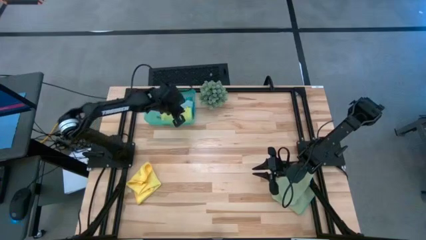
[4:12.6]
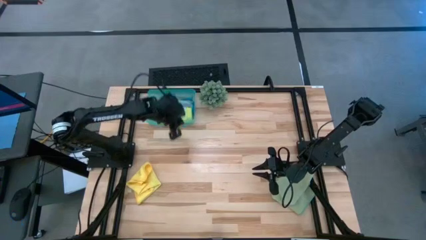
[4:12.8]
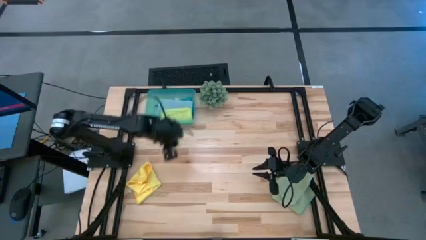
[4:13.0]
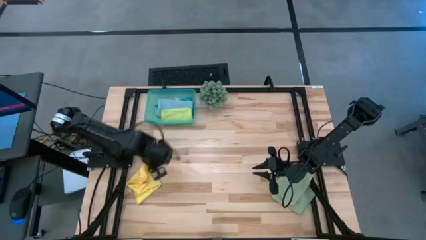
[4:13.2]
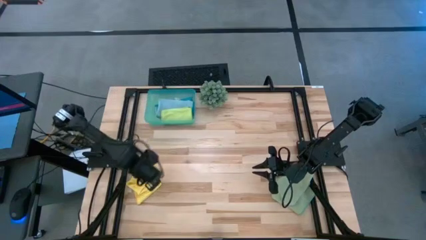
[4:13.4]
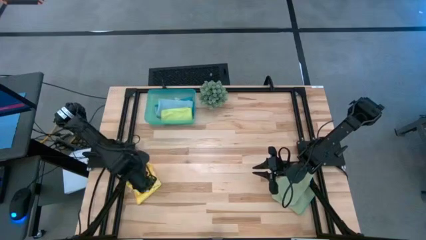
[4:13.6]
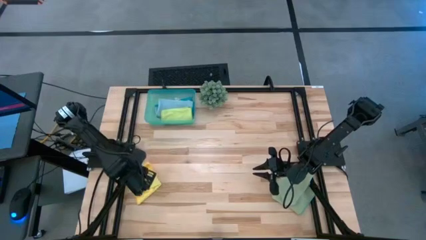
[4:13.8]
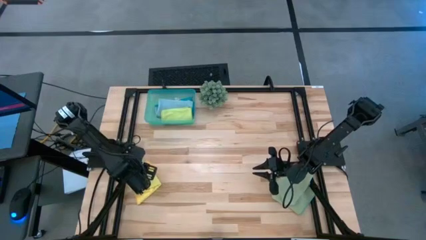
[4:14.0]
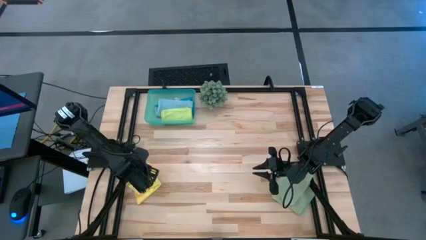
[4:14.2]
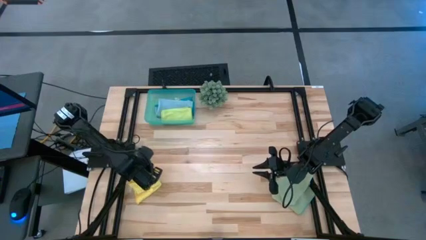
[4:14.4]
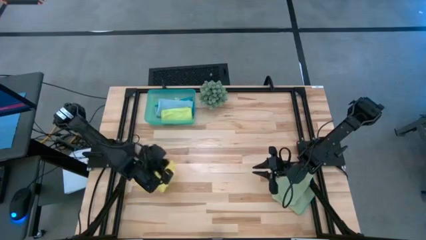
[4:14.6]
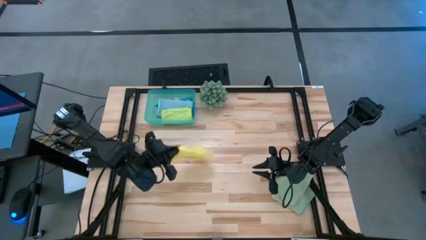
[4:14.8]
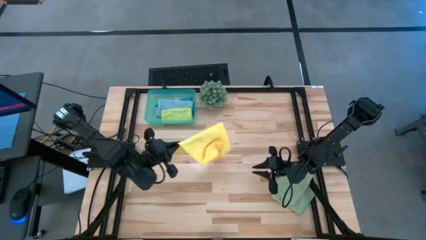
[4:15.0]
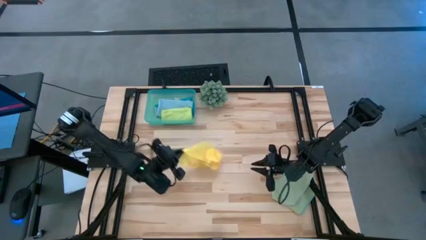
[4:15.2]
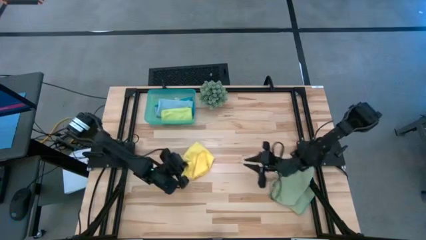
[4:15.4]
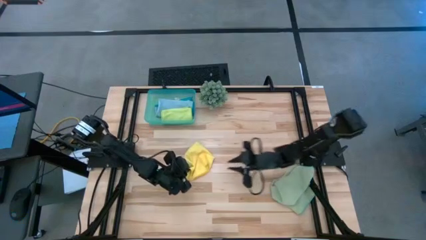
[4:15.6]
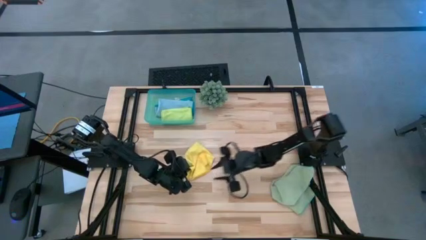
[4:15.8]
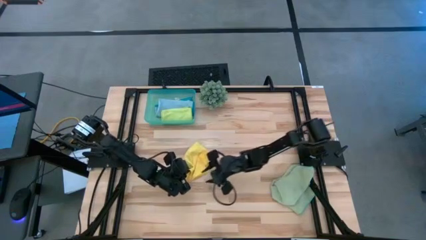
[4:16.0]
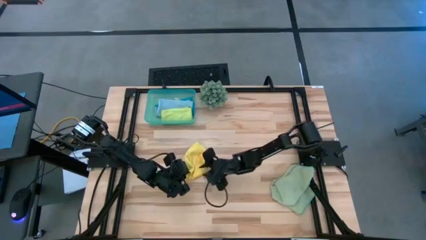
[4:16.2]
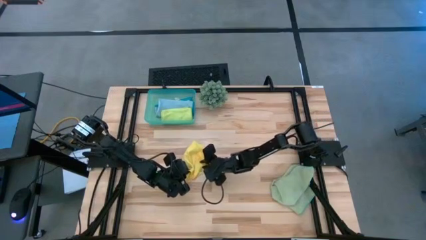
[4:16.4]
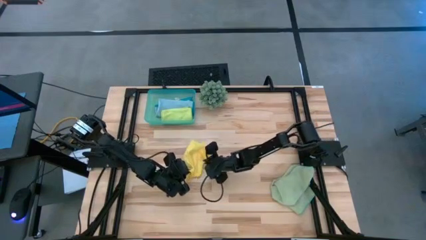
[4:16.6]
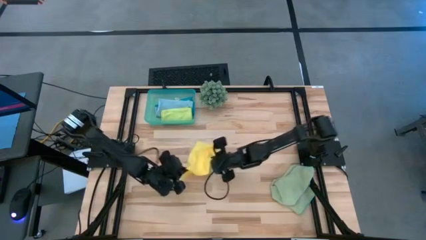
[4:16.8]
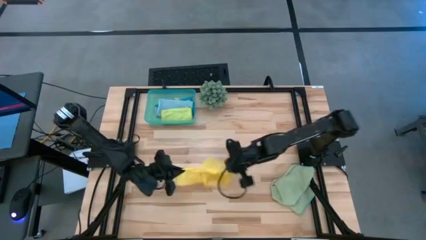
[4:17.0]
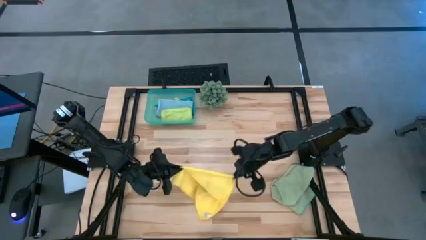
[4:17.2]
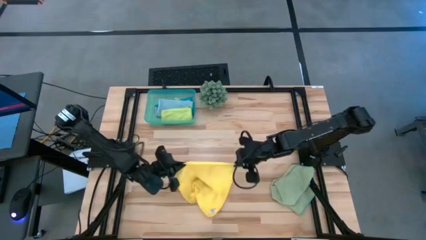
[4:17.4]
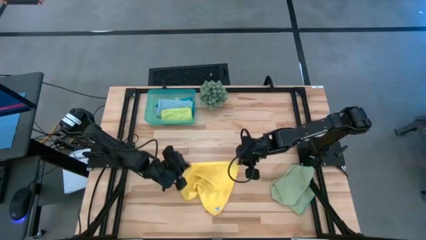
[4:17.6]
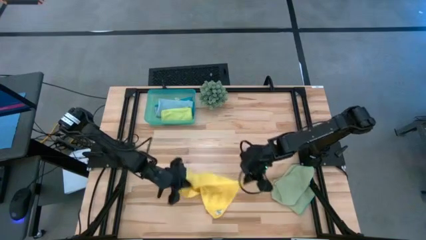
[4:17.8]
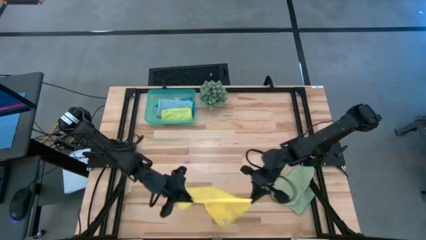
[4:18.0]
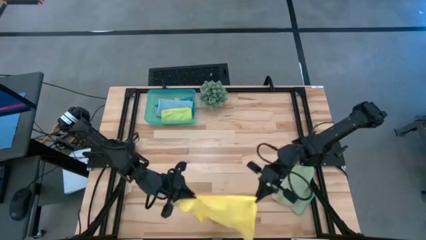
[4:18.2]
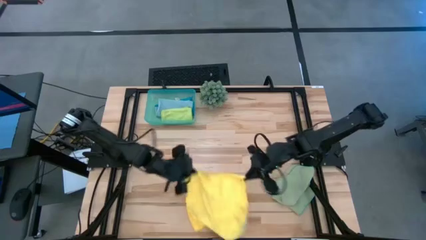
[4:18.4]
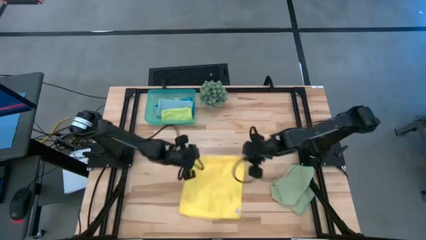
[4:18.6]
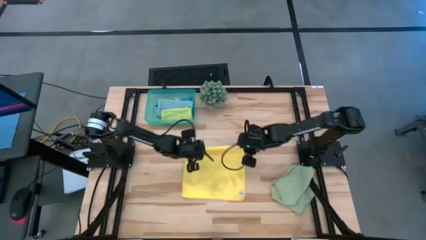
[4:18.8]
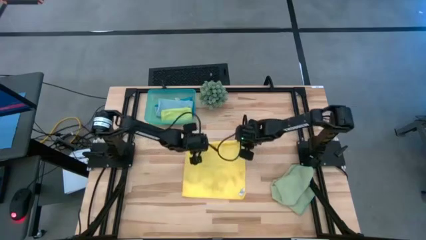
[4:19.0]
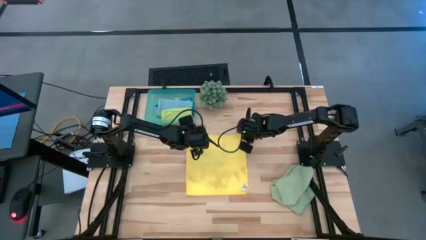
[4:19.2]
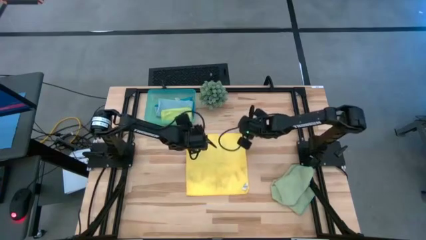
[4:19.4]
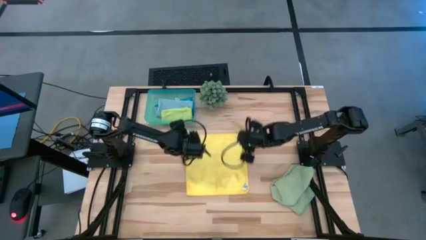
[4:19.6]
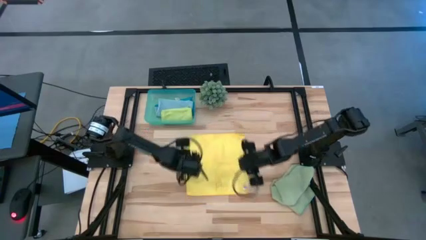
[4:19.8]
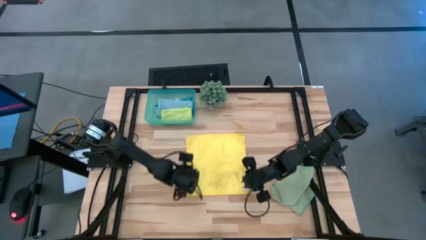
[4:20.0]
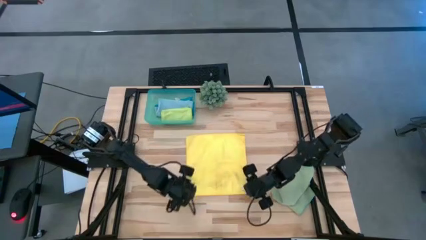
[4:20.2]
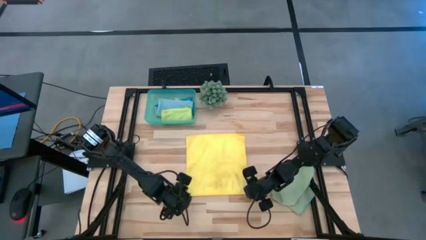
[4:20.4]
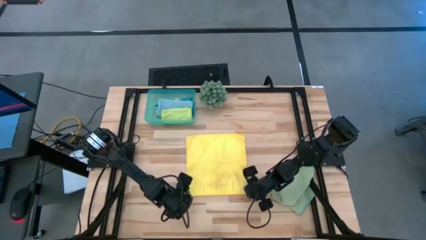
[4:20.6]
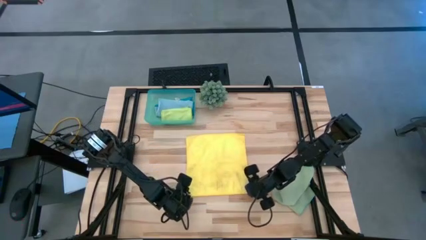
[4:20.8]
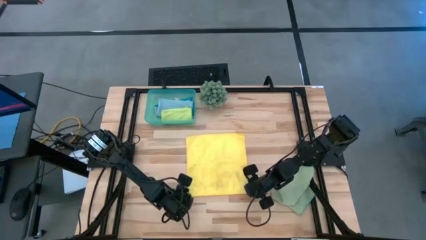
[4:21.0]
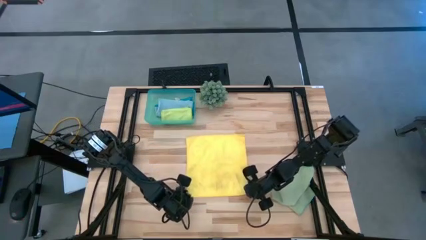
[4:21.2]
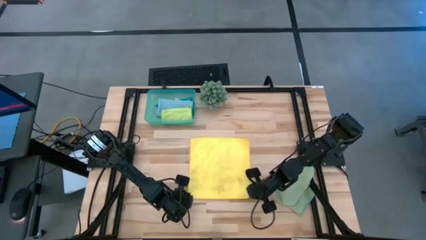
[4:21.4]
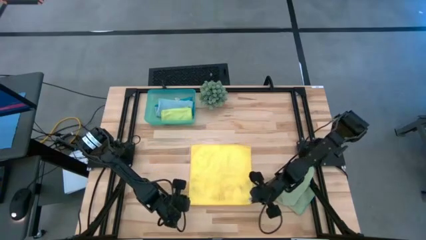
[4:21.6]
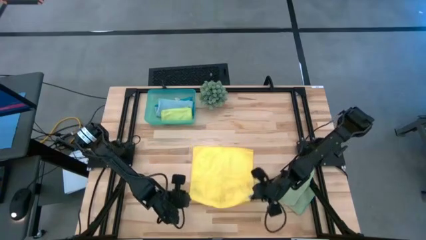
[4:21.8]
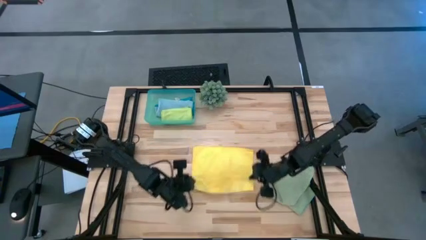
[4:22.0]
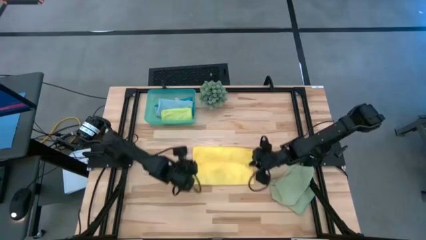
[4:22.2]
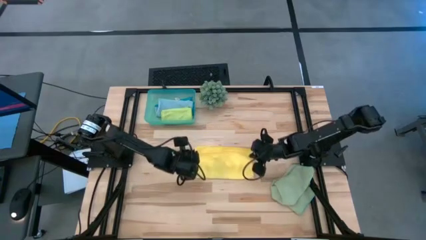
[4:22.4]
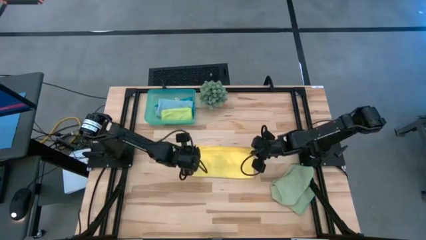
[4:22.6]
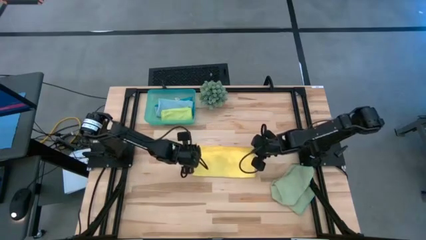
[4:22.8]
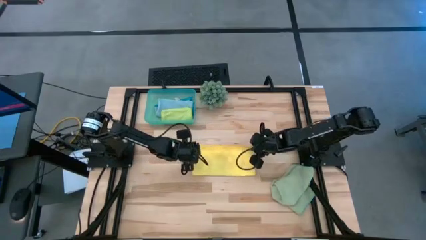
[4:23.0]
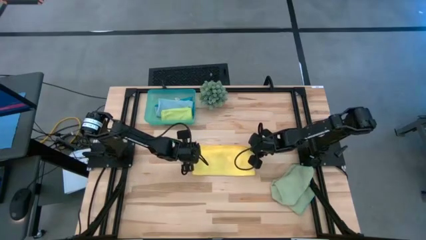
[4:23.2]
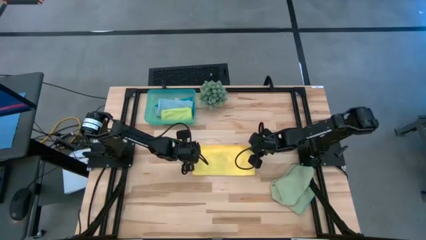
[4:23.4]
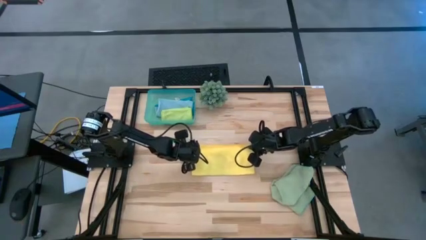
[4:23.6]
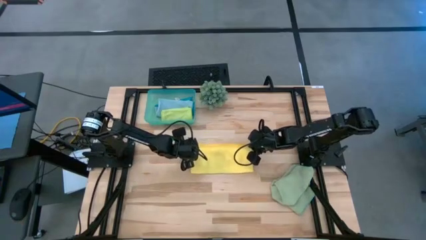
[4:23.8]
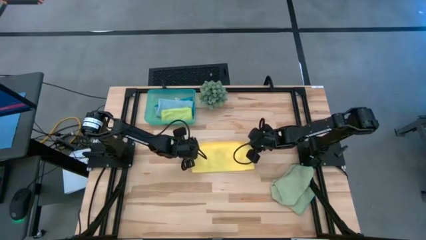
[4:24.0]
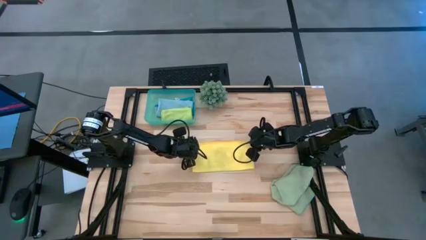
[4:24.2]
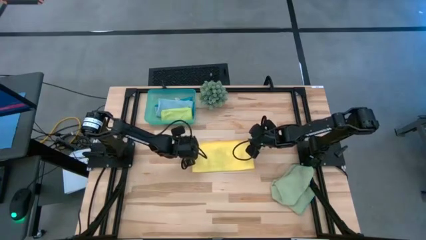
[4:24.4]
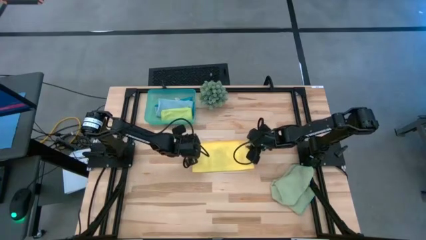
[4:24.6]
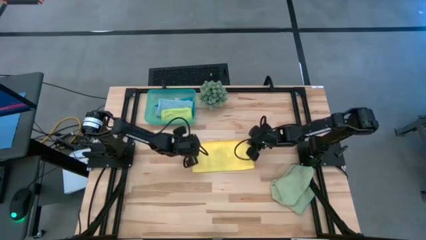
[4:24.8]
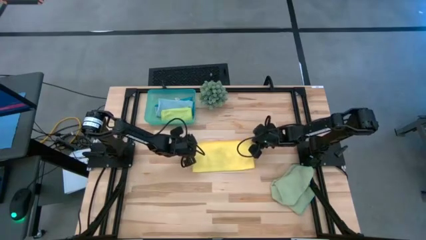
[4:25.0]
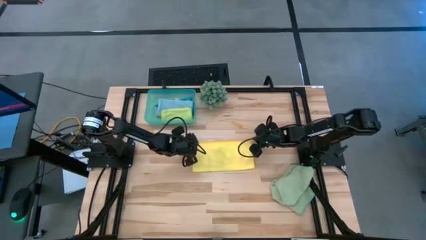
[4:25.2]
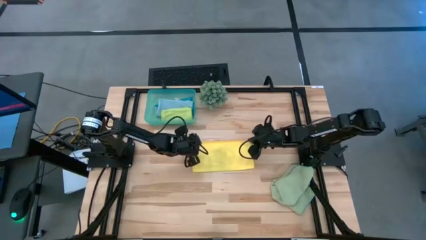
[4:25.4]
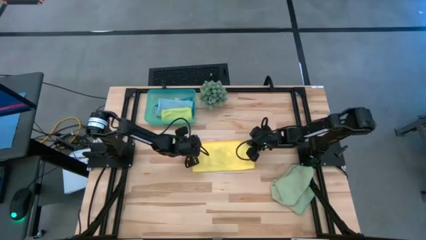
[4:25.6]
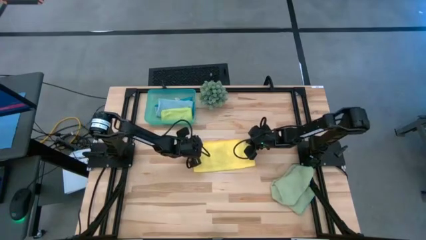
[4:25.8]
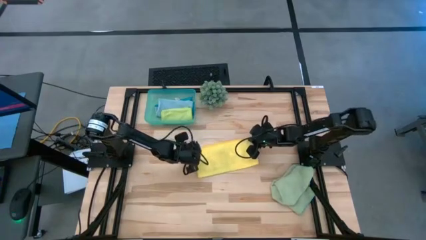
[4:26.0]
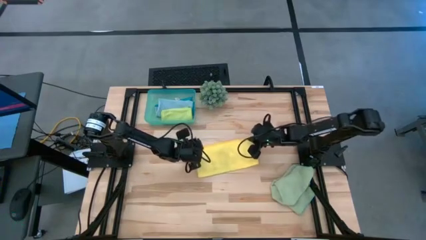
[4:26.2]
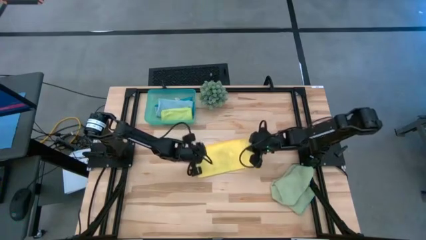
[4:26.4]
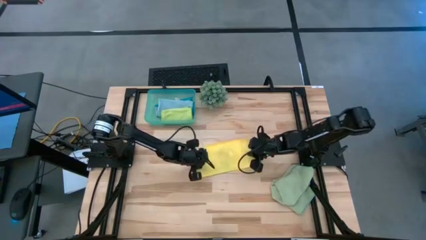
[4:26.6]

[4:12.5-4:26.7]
Task: Fold microfiber towels
Fold the yellow microfiber cloth
